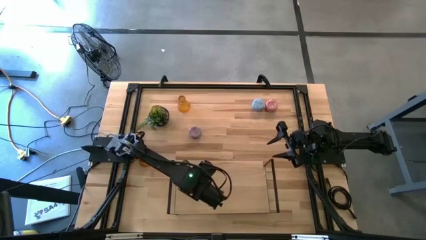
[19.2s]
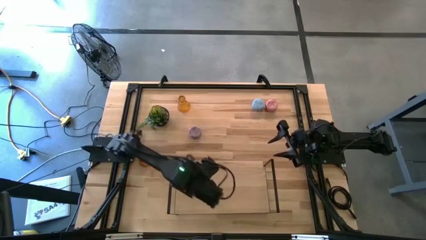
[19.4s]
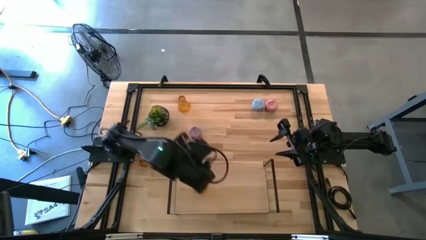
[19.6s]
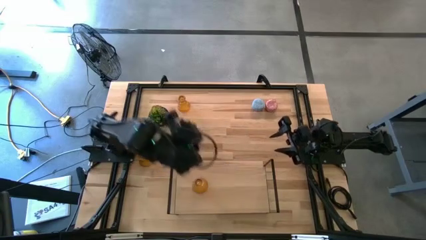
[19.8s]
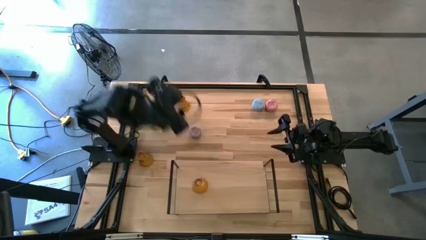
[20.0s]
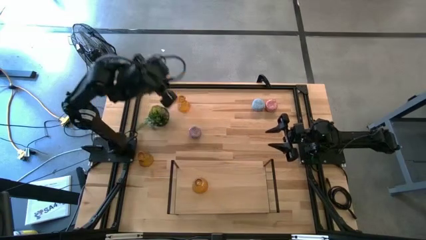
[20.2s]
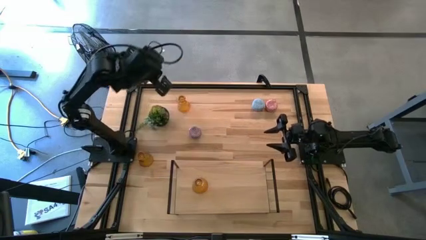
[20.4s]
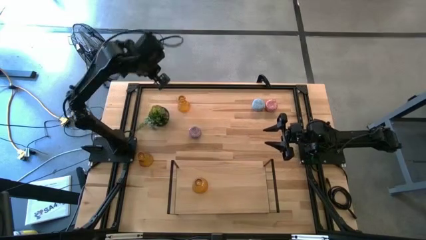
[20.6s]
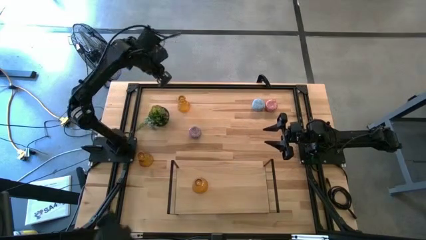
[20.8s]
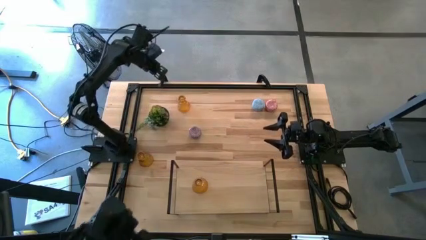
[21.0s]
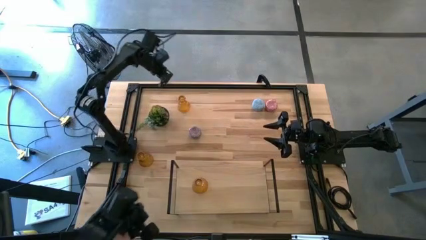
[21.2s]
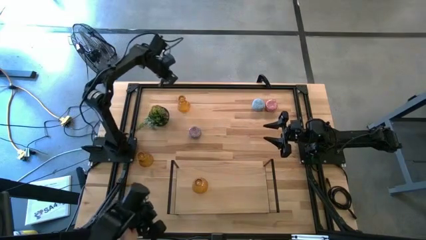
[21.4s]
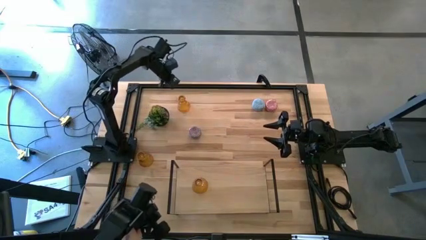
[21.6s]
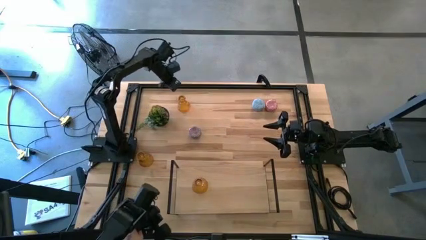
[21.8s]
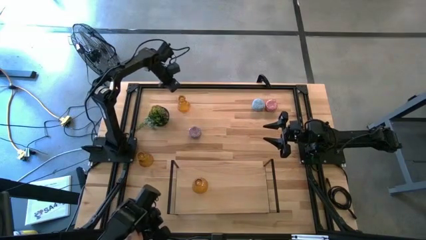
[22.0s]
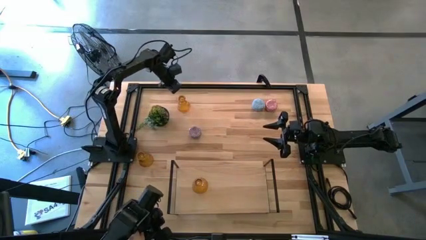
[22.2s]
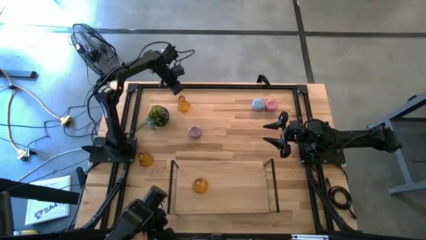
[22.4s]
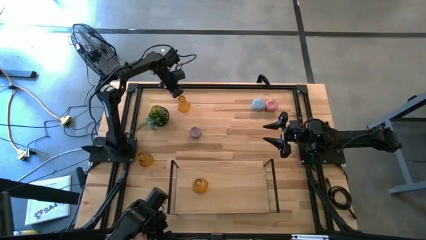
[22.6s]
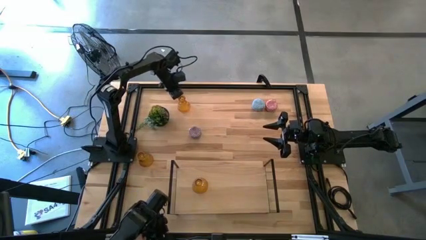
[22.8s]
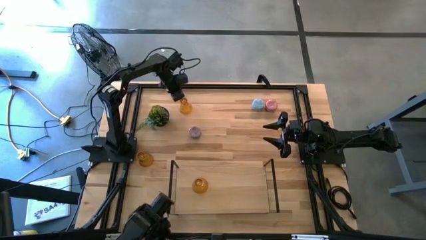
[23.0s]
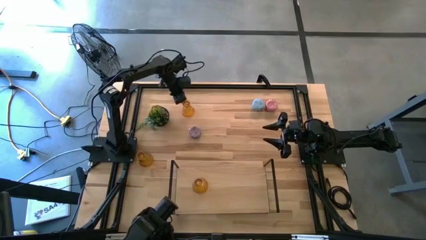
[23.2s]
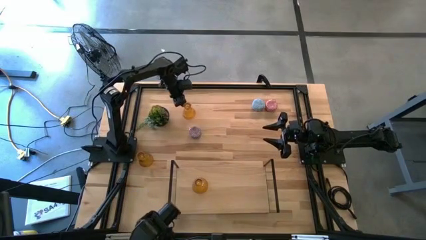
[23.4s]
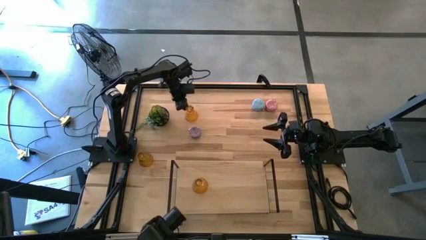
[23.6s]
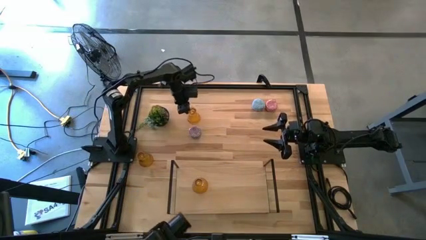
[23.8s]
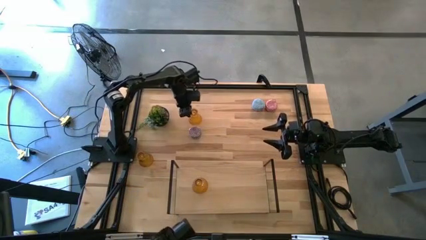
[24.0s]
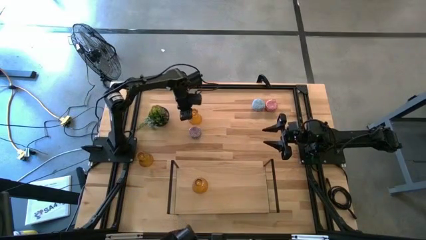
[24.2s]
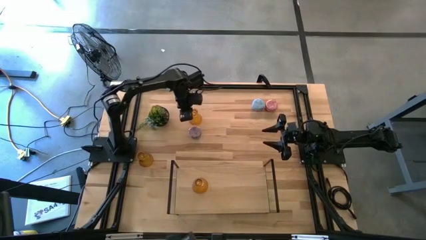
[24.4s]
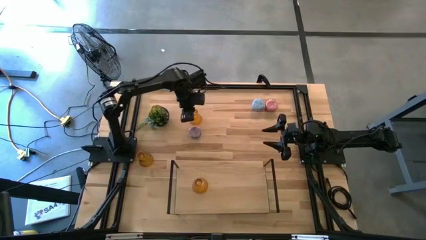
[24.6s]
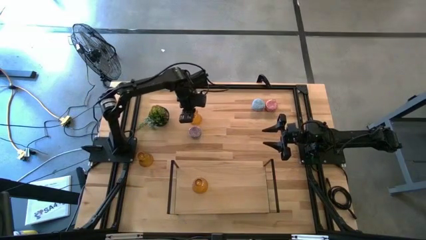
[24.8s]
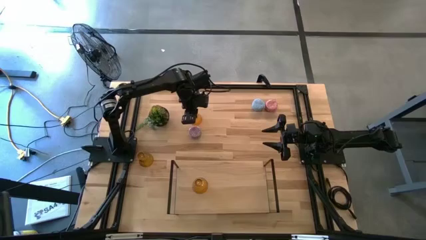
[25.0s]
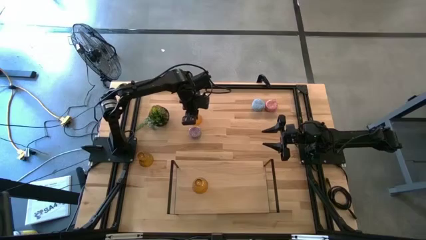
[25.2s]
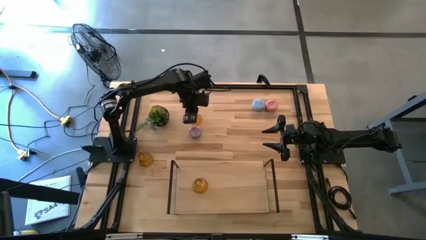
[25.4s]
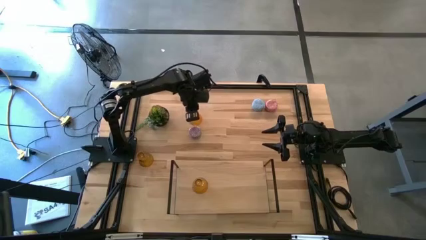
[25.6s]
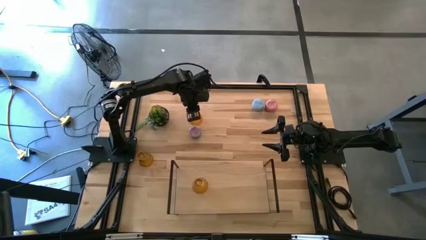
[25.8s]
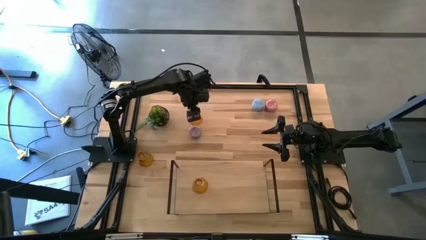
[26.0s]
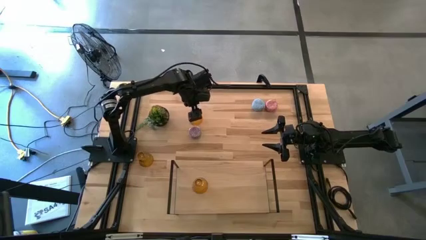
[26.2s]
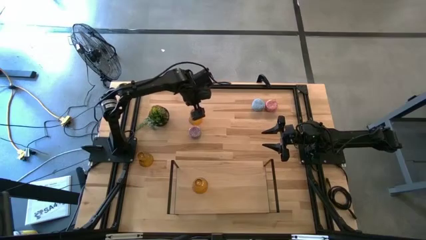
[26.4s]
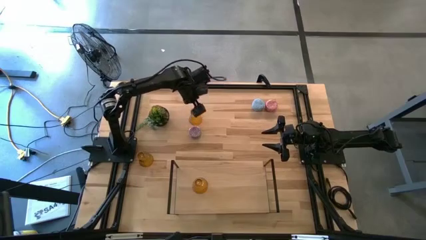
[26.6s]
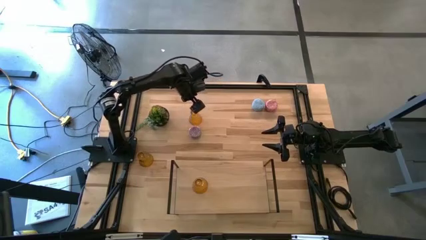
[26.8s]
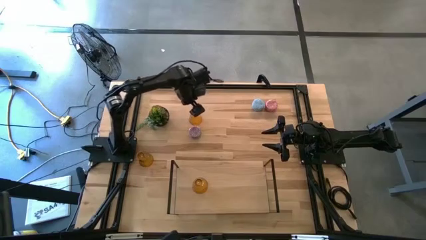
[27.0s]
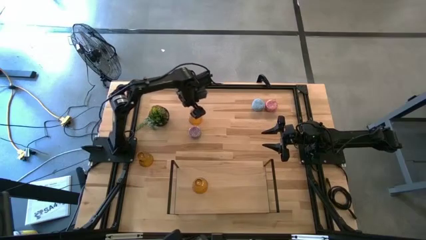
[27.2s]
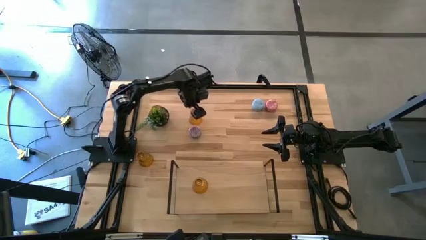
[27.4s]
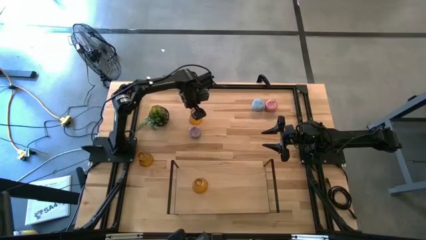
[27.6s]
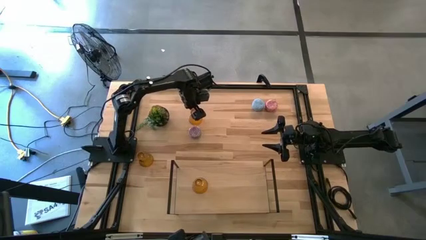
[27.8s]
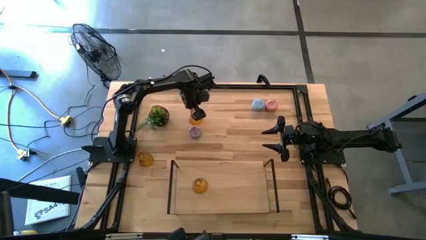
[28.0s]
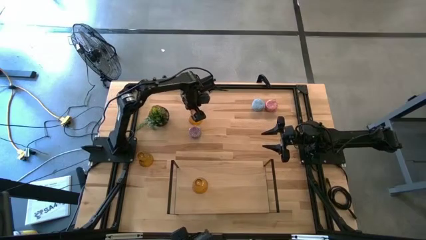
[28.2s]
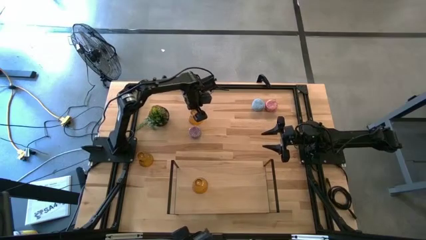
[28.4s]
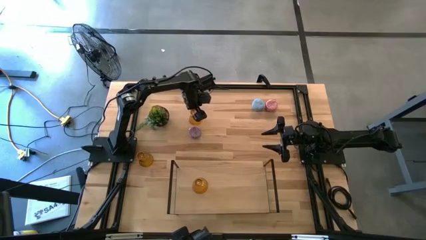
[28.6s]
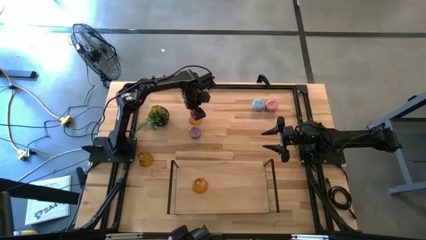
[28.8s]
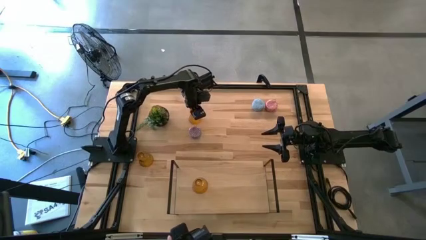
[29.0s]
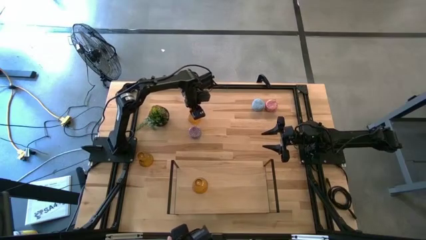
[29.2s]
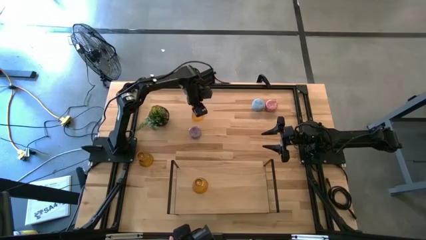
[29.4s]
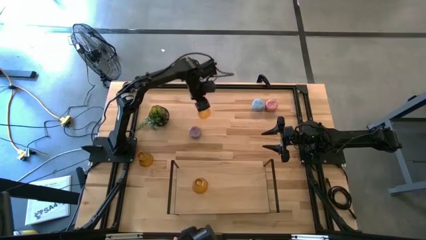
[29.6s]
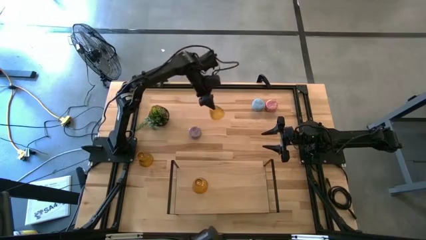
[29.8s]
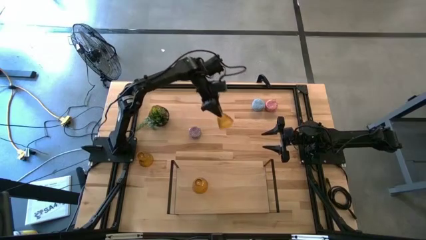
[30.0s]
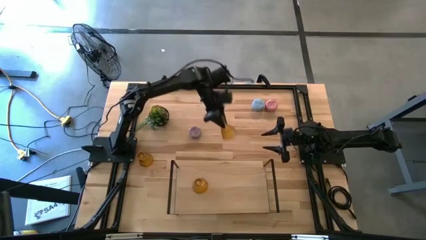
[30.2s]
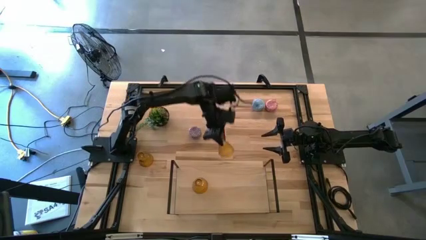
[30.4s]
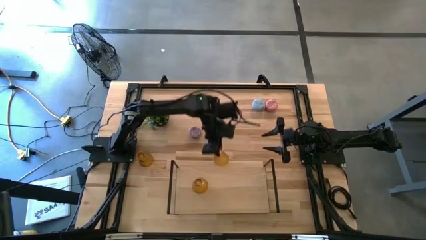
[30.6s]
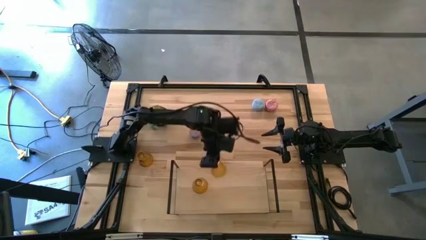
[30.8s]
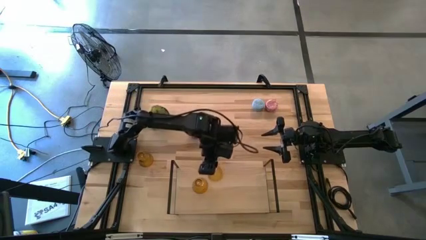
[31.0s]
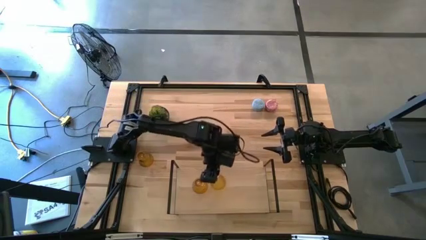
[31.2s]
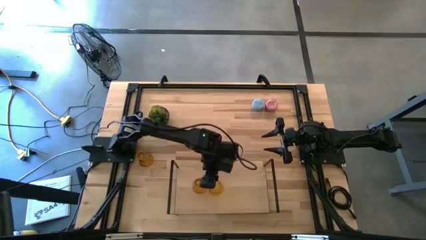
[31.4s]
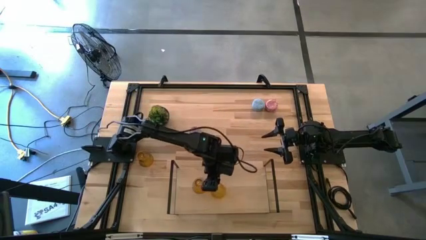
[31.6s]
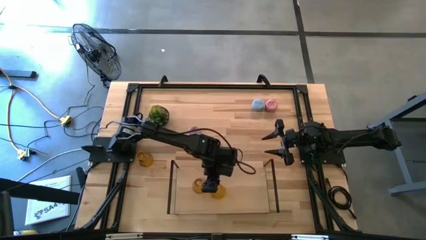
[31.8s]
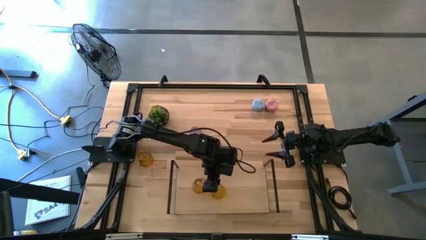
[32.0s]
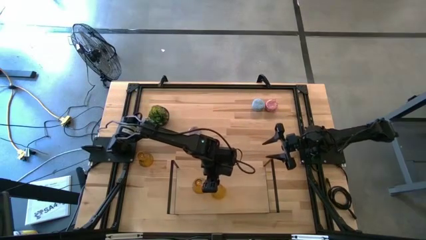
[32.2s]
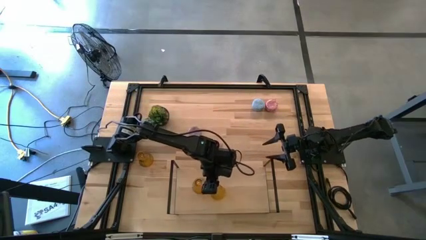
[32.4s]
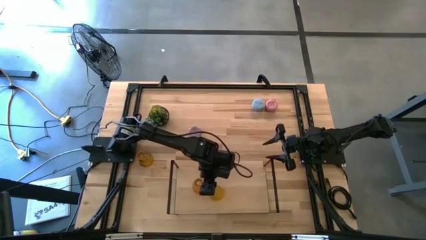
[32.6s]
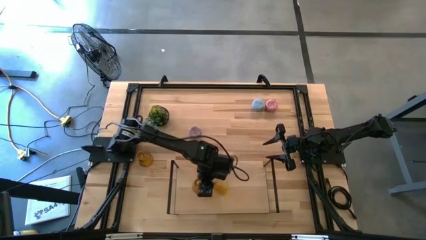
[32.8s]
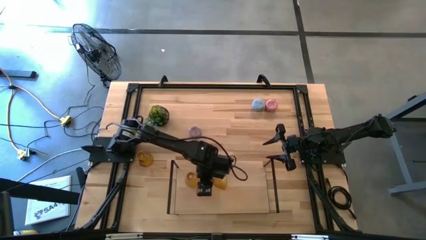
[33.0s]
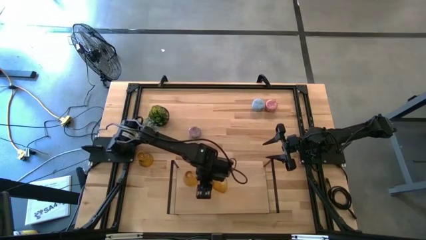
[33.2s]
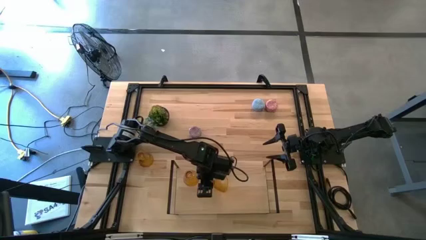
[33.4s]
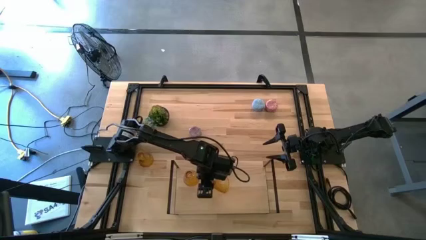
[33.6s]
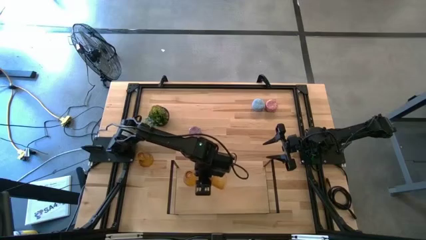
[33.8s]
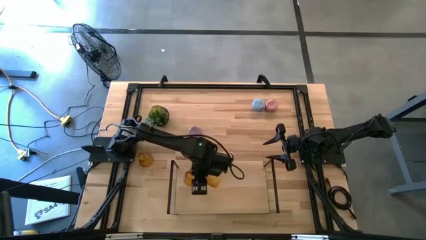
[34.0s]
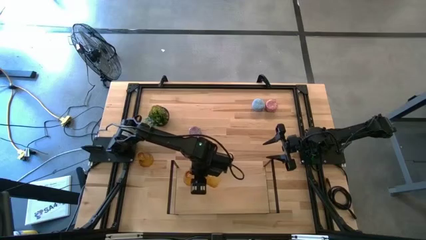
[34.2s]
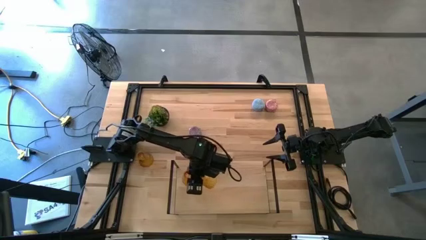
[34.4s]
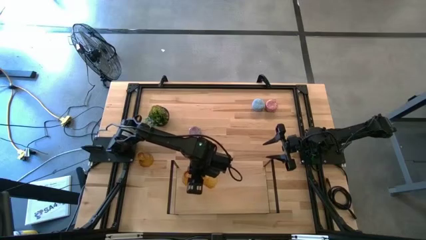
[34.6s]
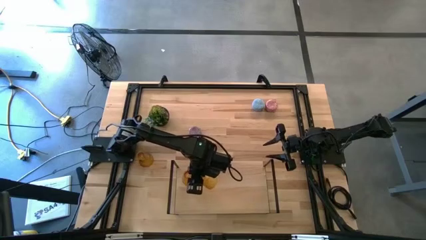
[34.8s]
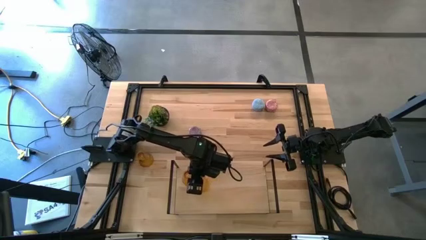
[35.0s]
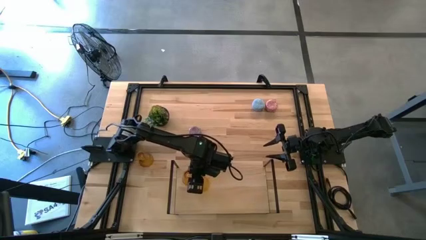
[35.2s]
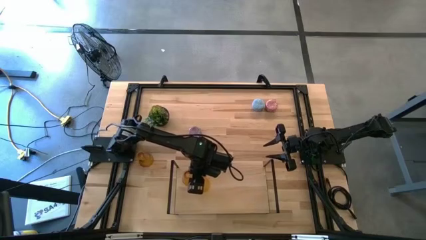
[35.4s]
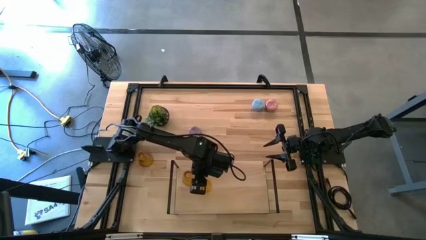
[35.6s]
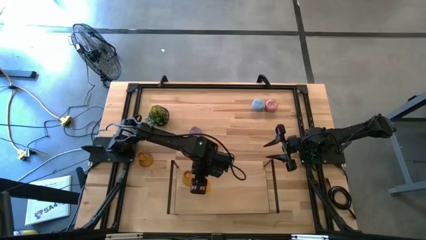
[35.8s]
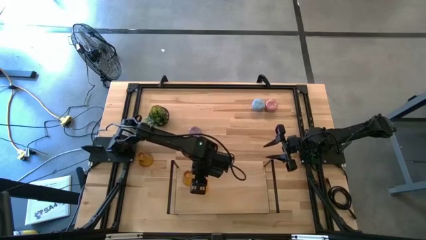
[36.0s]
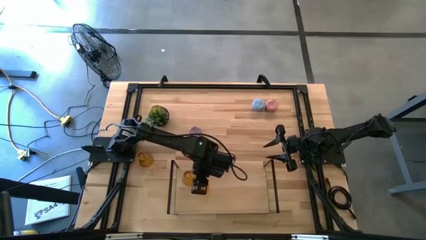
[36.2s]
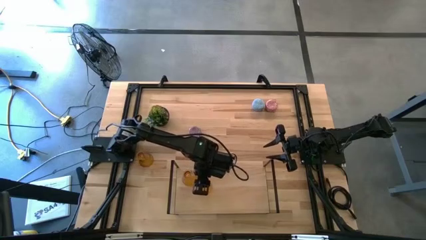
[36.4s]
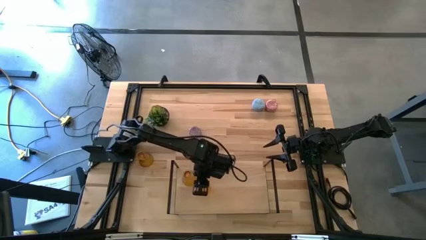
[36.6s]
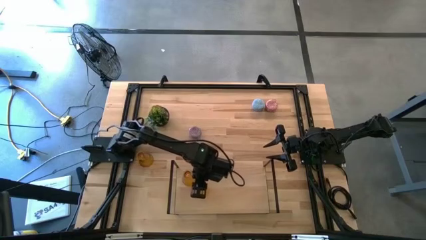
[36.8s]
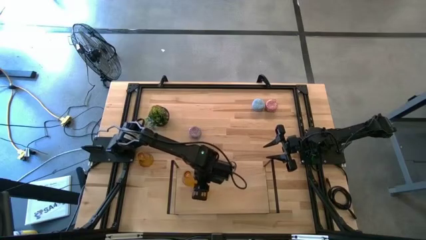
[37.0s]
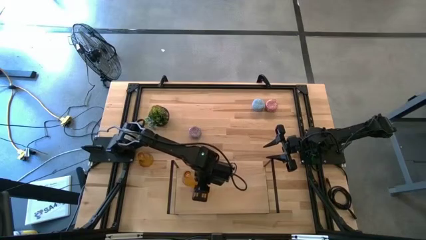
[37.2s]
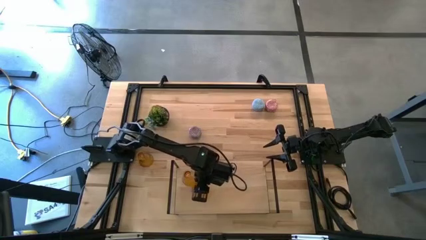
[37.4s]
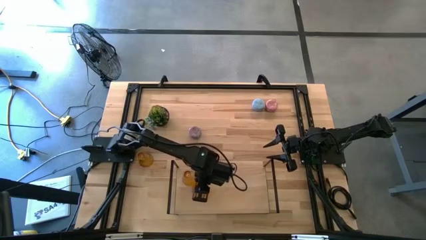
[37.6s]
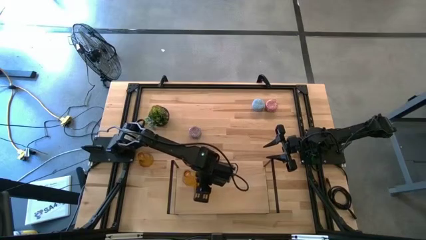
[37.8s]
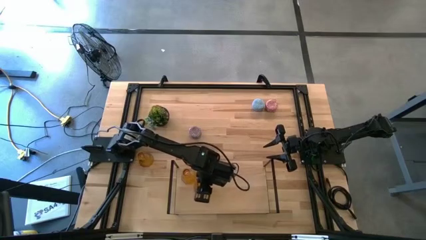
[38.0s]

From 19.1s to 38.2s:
Task: Pick & Place candle stick holders
Put the top gold glass candle holder on the shelf
